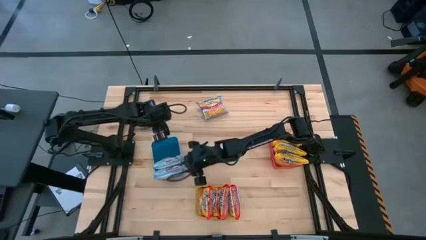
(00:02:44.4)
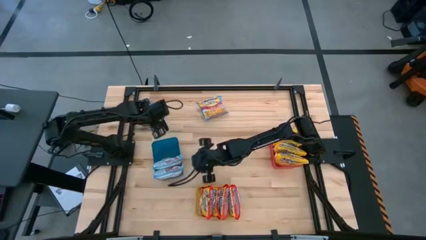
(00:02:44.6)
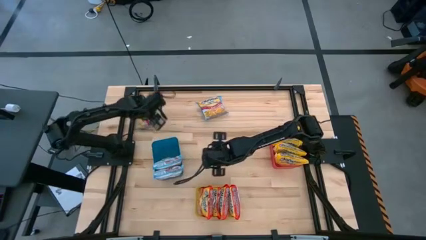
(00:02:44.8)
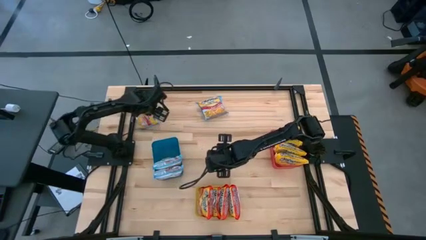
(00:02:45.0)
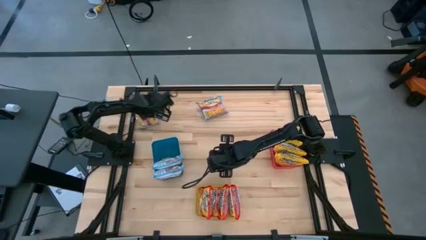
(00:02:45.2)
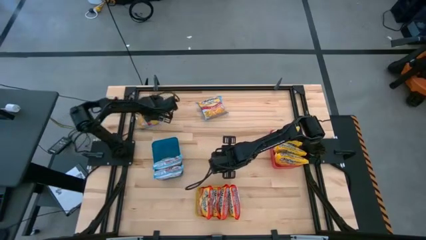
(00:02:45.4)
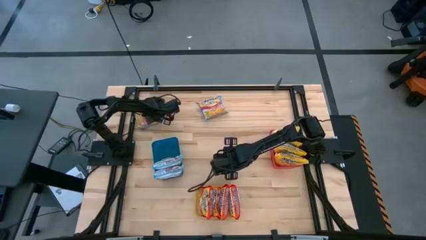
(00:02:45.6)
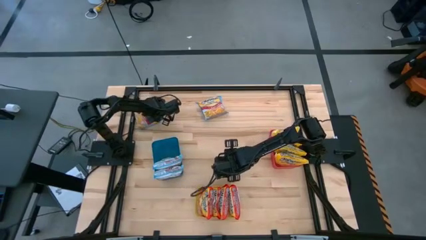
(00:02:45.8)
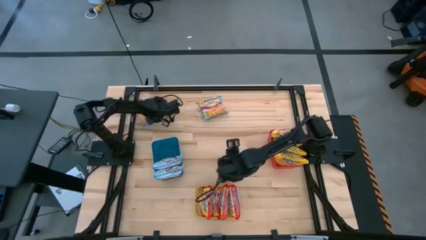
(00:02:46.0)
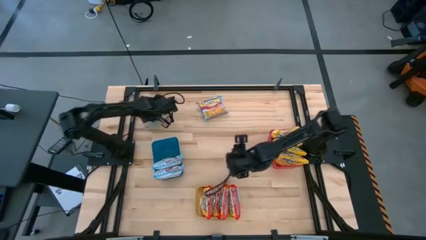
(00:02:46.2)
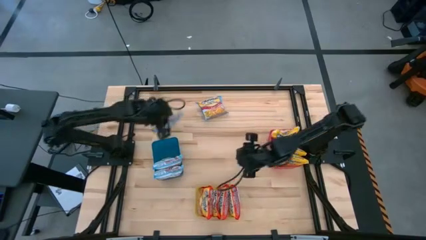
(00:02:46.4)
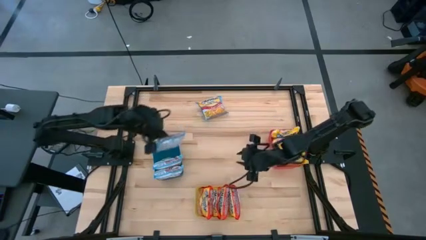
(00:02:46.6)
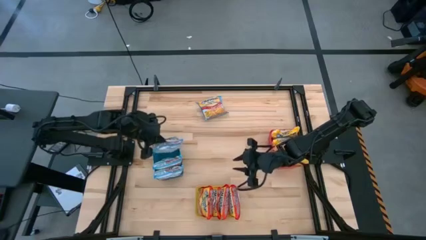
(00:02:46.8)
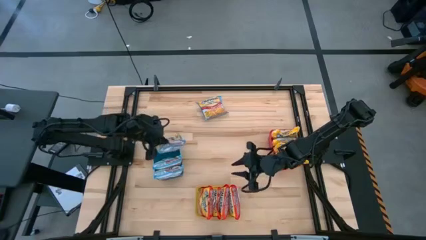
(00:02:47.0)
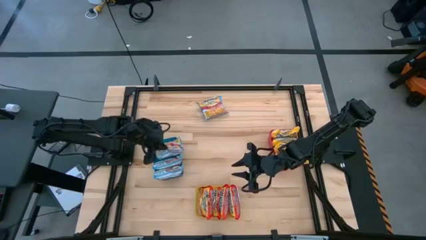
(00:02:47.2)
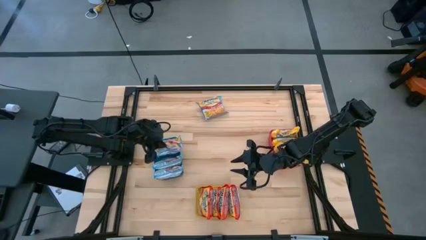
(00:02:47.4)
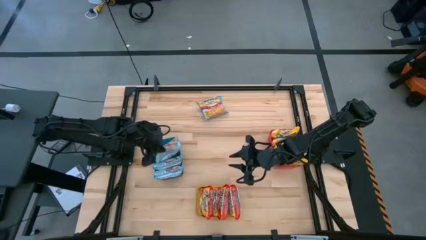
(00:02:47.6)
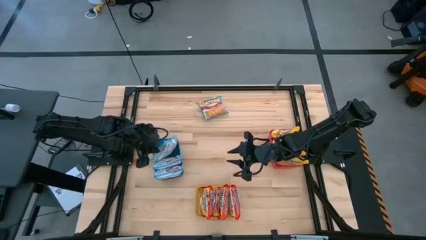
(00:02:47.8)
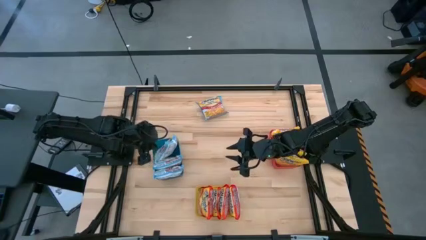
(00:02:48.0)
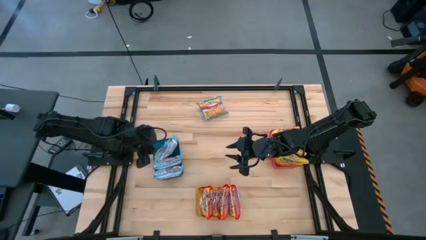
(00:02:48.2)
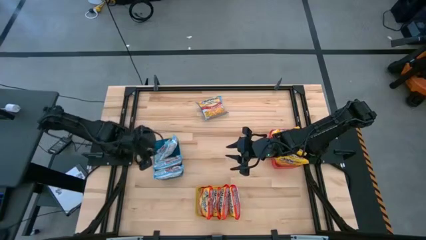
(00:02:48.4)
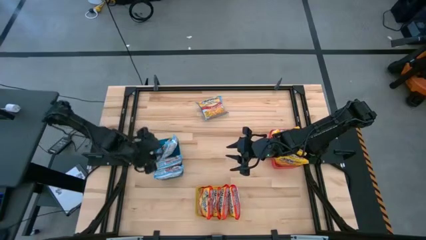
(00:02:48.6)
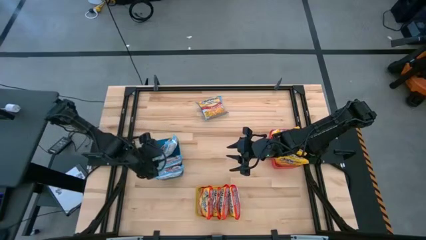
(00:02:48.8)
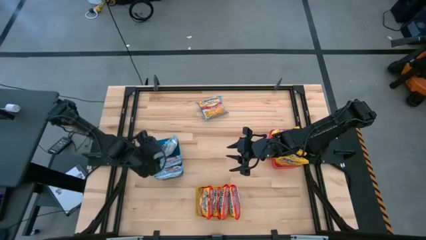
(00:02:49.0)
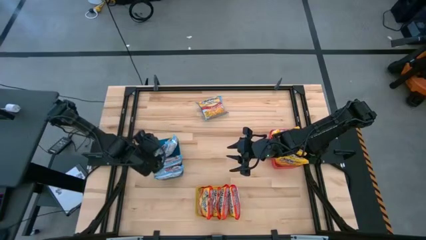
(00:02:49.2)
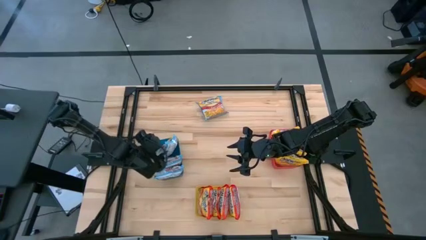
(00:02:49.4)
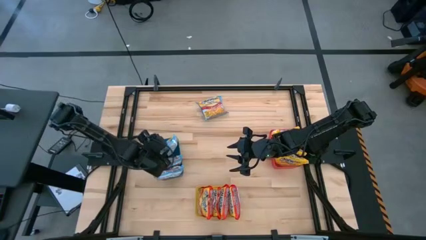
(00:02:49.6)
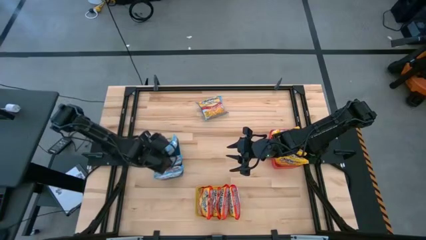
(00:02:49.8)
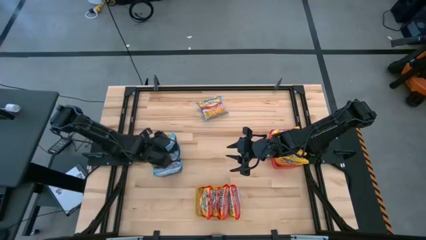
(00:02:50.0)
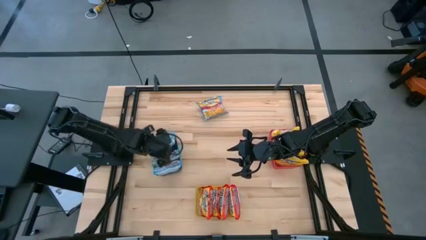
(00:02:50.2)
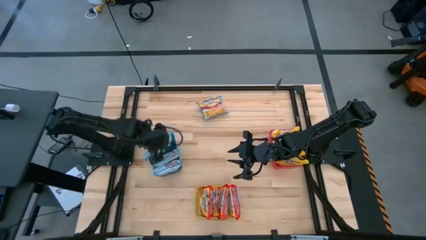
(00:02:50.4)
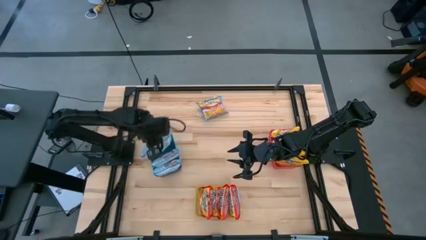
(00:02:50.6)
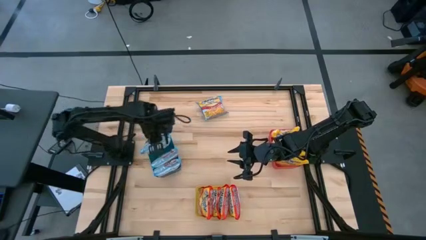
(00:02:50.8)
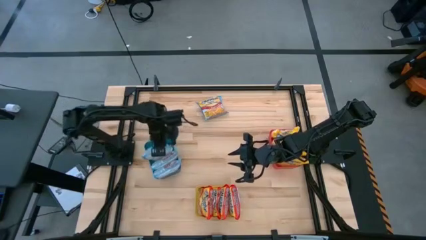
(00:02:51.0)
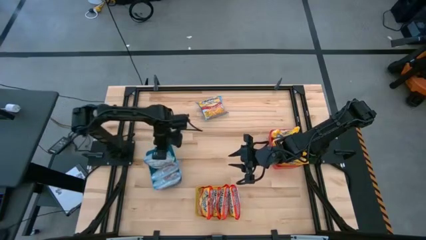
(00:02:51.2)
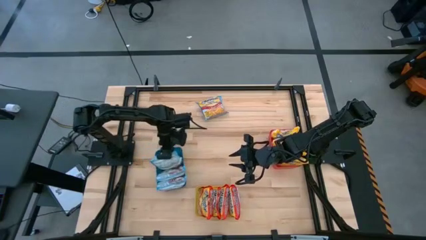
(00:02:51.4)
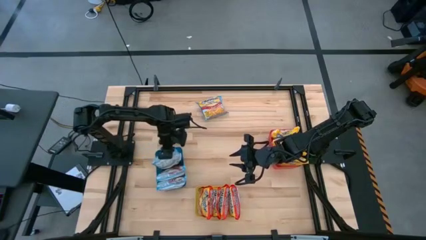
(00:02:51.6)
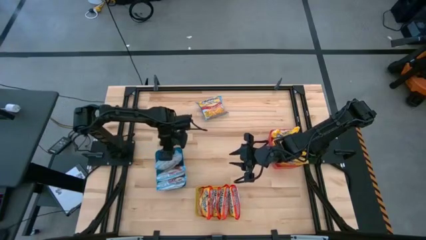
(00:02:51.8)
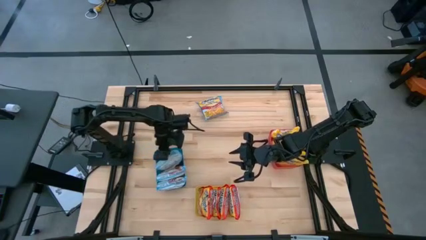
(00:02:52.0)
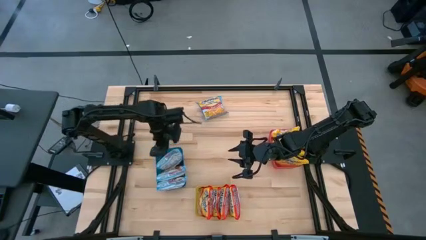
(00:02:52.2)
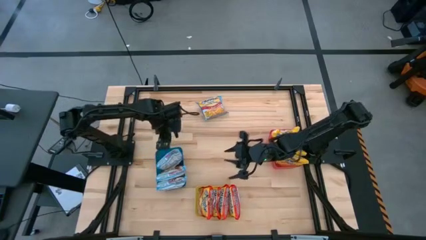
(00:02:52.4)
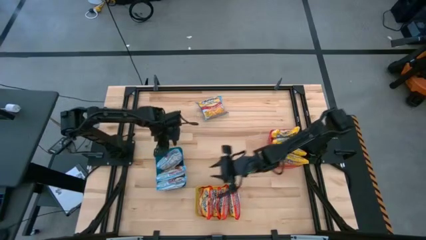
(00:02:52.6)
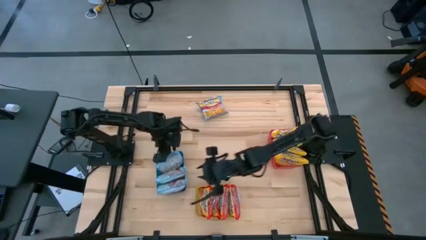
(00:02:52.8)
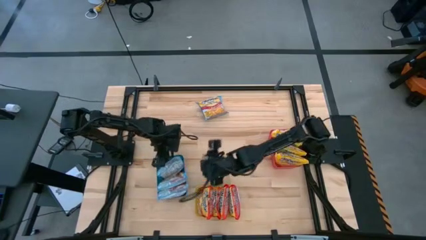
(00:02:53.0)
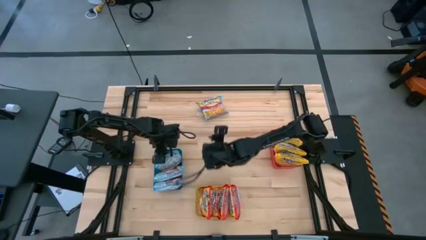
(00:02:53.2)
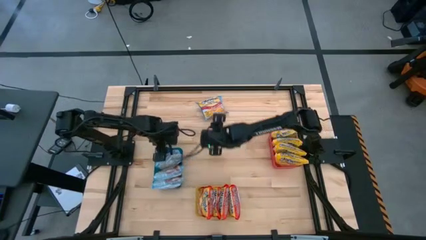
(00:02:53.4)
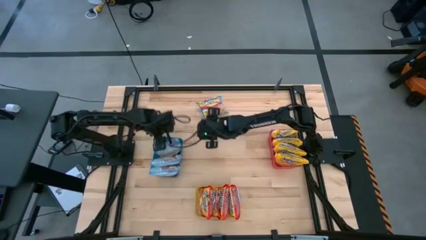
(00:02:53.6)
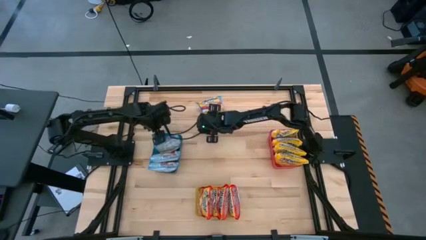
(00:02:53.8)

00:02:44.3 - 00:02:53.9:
Task: Sort Maruchan noodles
Put the left noodle pack into the blue bin

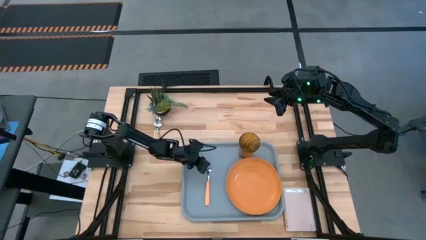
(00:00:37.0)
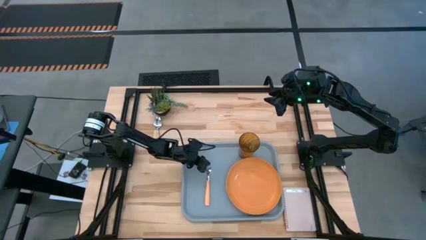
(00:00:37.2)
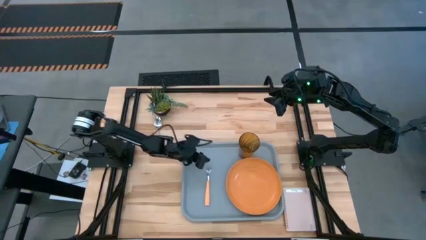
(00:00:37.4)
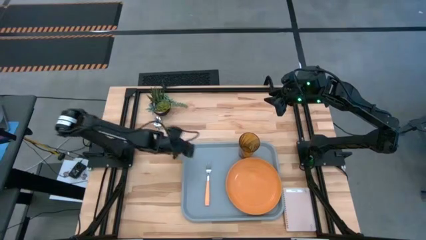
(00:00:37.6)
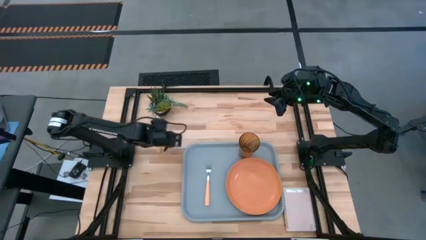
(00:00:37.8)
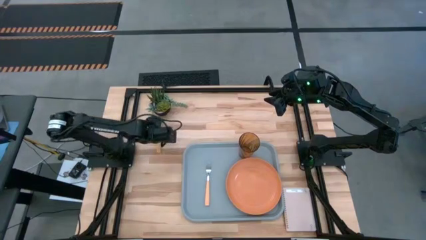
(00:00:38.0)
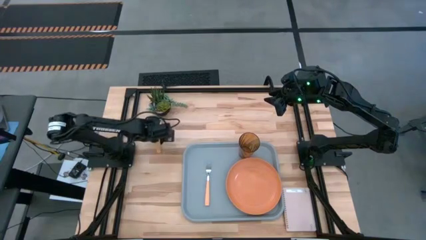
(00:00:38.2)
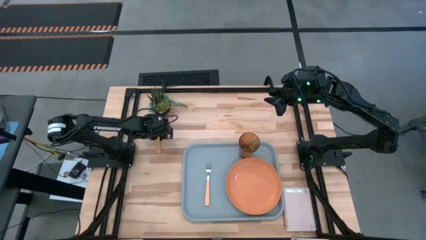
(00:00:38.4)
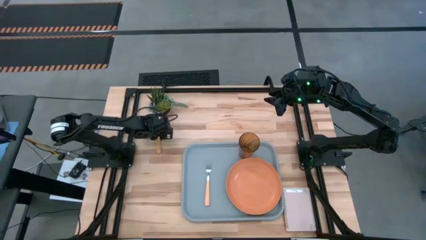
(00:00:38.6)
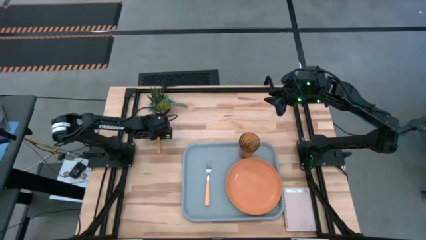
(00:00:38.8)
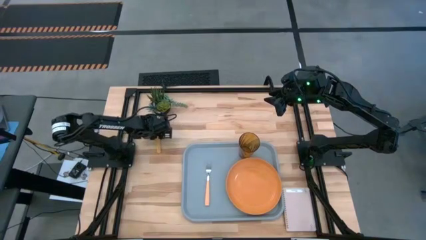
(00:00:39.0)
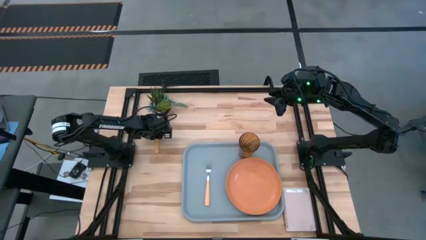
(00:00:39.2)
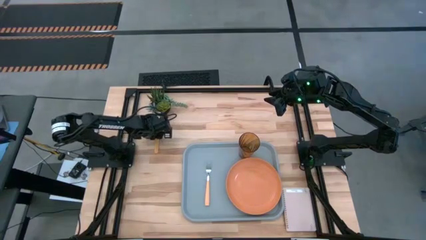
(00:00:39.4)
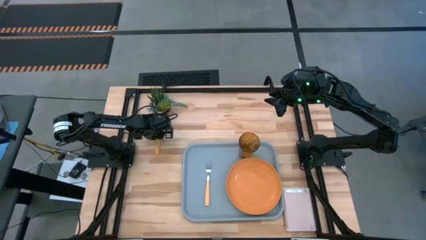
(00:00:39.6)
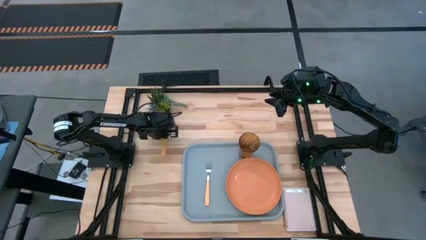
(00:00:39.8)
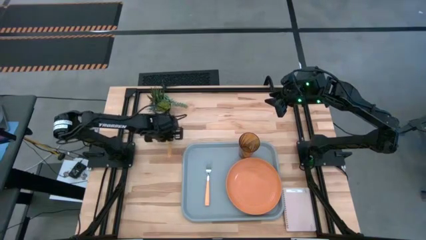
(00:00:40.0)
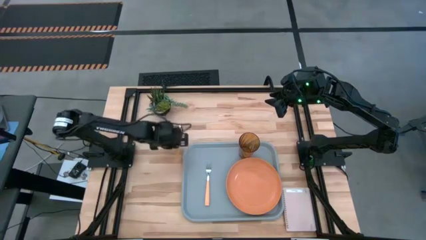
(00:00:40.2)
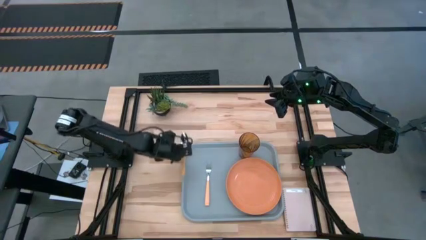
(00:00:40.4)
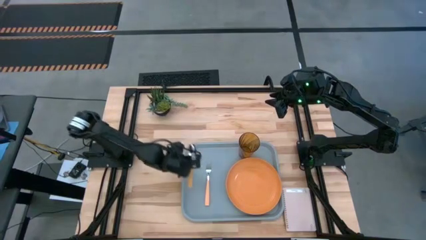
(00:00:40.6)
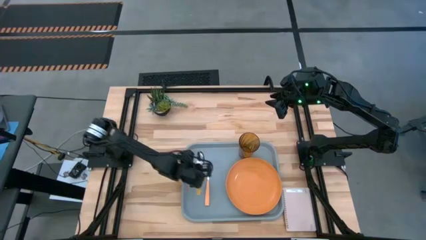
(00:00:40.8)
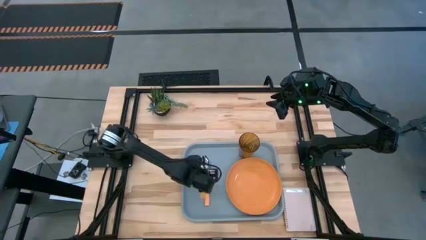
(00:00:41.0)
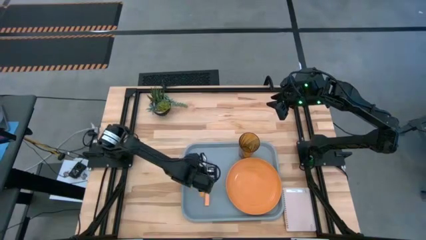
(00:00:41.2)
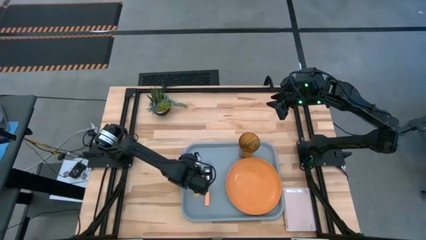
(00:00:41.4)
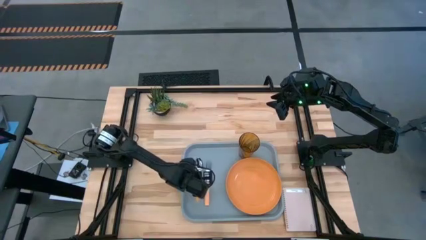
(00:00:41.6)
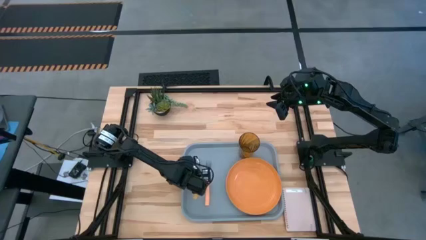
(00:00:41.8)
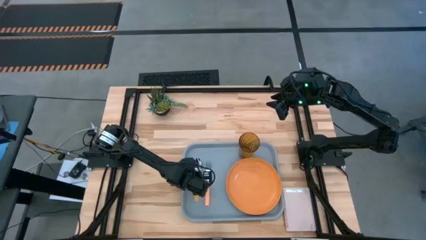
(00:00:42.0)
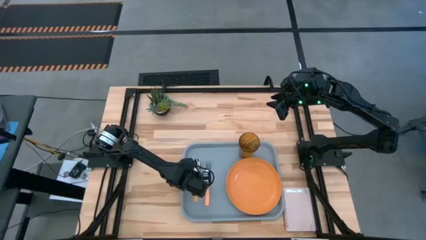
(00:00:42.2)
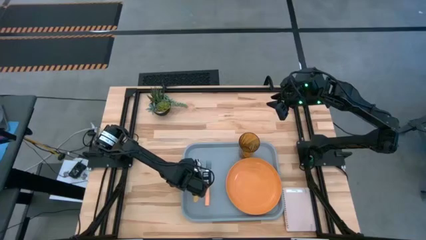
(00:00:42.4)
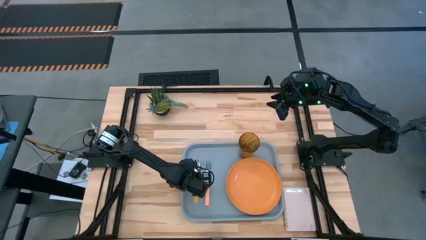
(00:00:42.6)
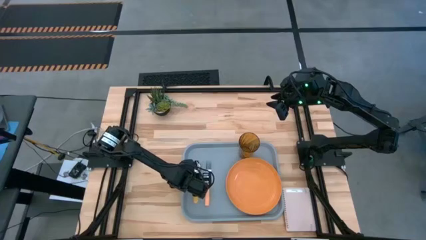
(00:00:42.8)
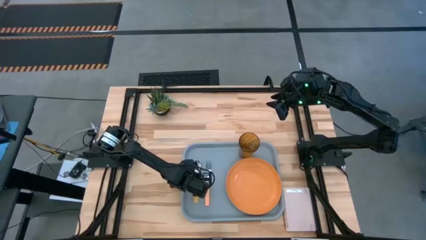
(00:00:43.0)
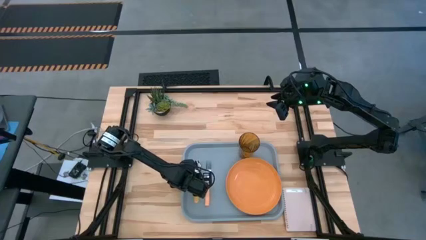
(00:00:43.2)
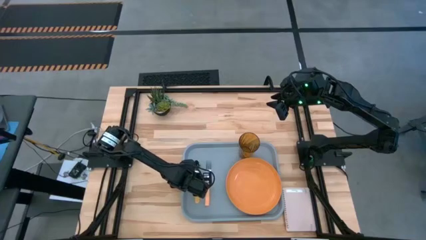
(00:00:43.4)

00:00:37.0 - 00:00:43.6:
Task: Pick and place plate/cup/fork/spoon on tray
Put the orange spoon on the gray tray to the left of the orange fork
